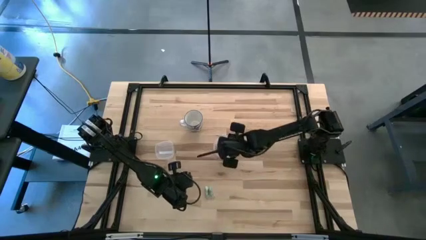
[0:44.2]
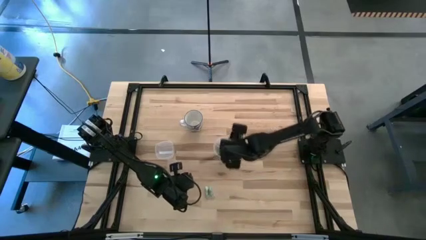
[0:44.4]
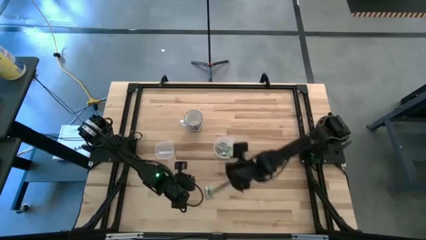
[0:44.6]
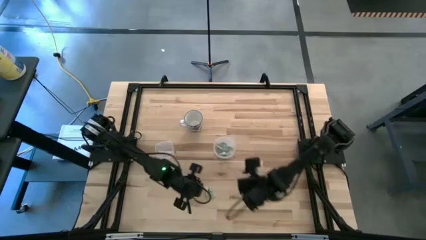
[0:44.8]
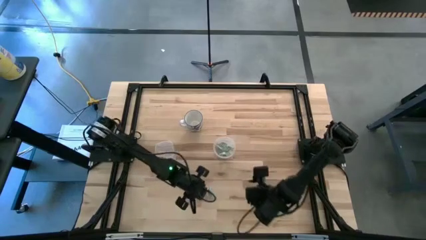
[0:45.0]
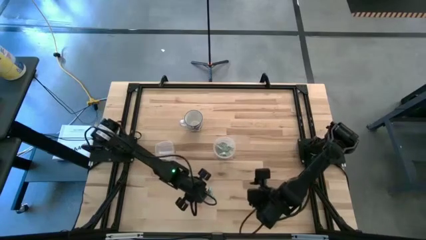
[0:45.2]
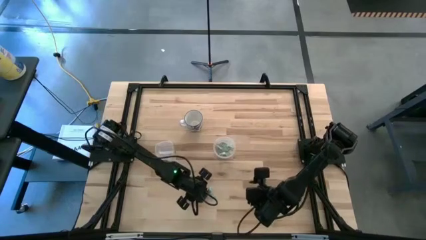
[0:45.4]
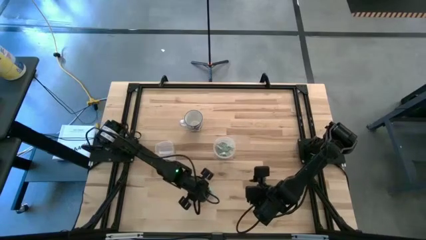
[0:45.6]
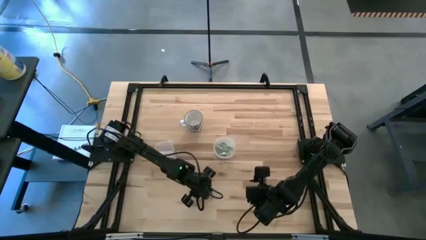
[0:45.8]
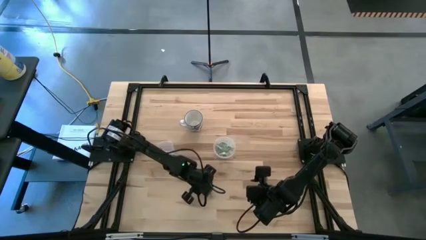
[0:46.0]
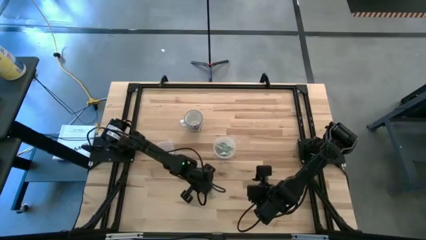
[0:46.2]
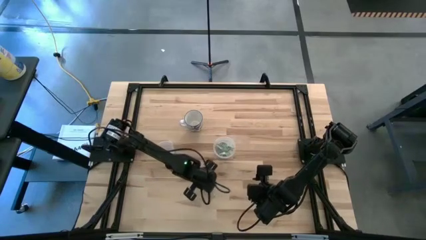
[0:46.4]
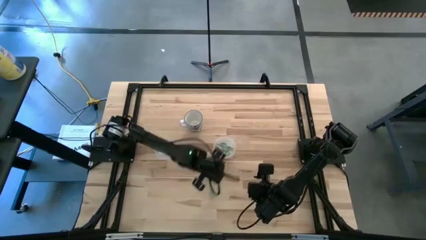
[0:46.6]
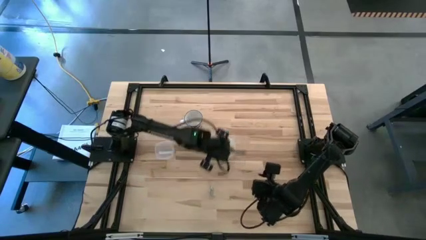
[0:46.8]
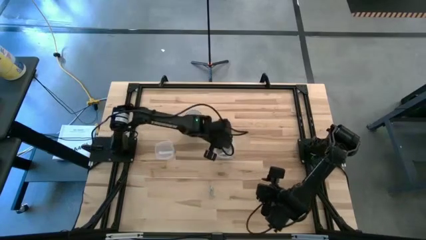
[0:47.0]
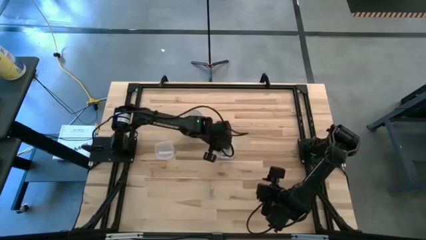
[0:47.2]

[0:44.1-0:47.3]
Task: Pick and place Stevia / Truvia into bins
Put the white stevia packet into the right transparent container

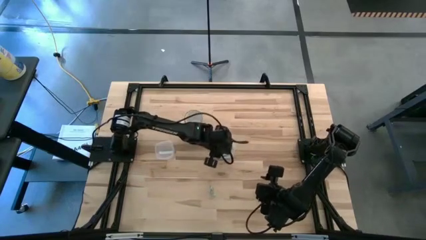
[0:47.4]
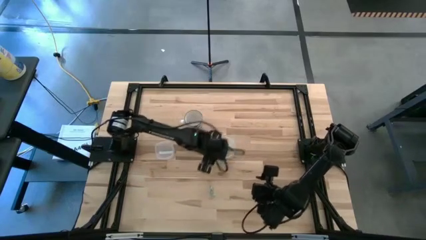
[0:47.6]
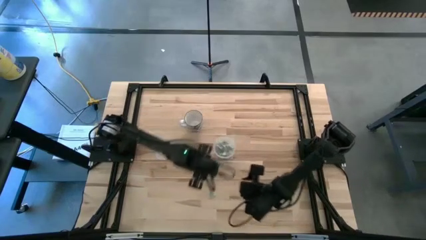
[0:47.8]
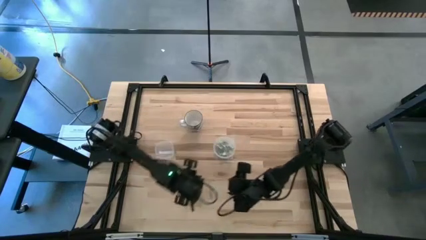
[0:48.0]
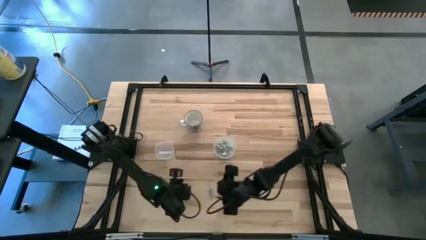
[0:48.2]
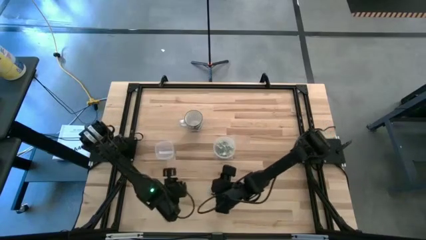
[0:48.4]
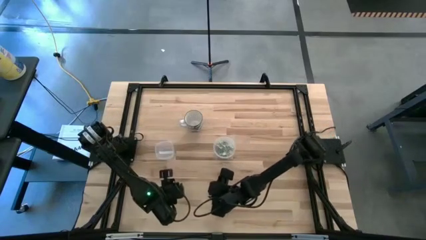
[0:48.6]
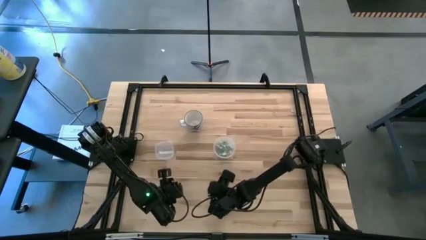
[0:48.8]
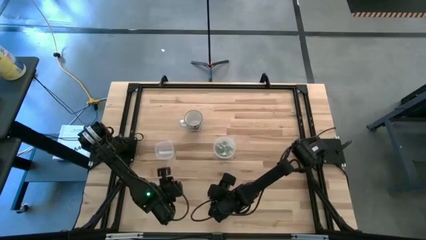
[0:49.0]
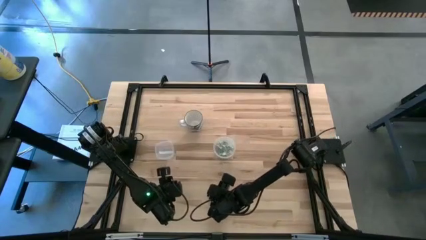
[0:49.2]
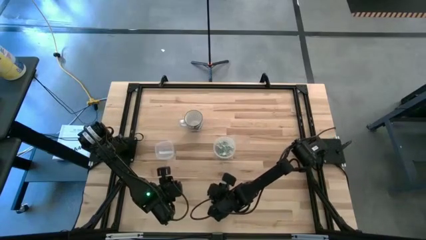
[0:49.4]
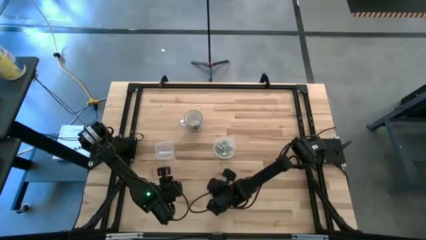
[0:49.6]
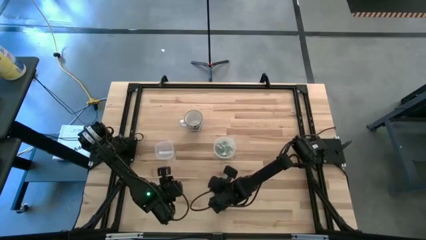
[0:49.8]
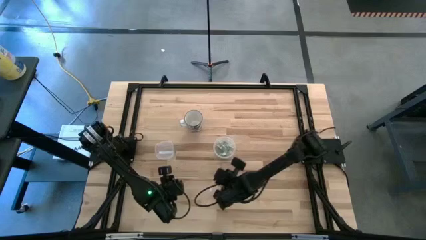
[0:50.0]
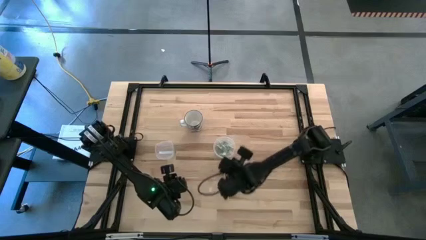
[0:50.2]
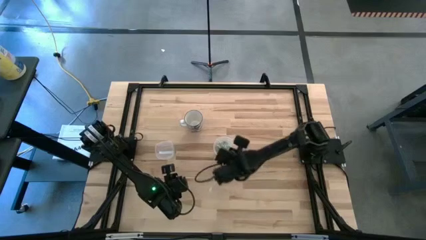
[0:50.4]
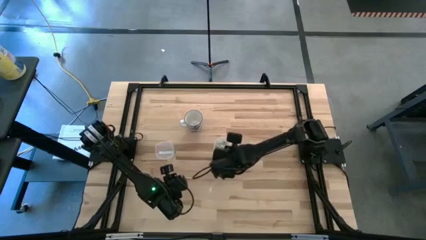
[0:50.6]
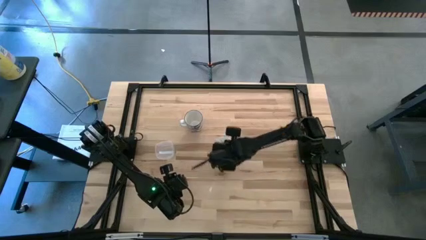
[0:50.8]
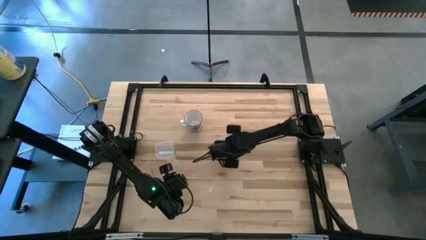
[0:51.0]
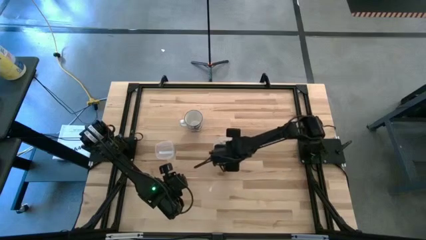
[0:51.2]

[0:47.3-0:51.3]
Put the white stevia packet into the right transparent container

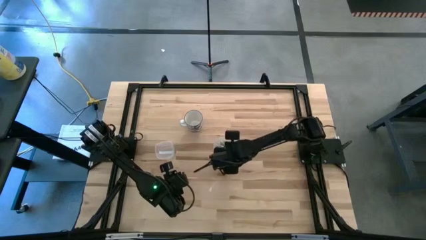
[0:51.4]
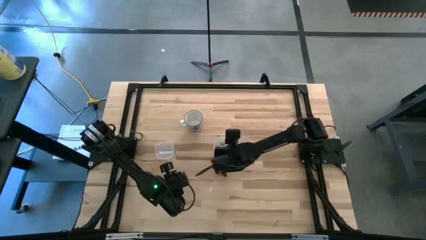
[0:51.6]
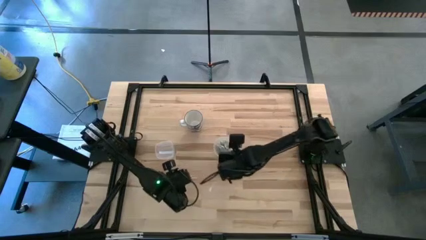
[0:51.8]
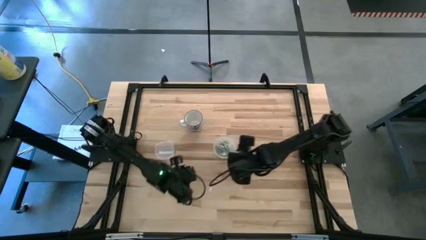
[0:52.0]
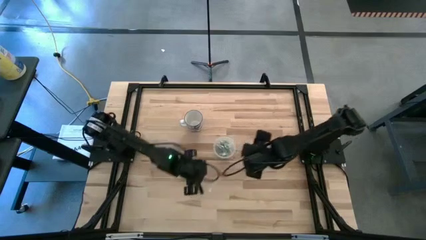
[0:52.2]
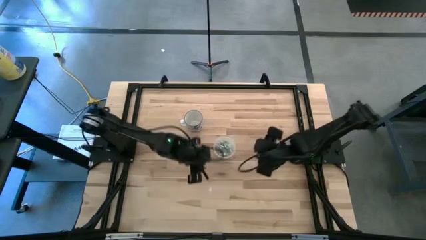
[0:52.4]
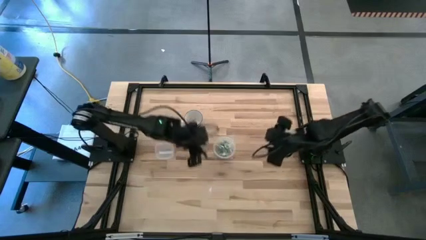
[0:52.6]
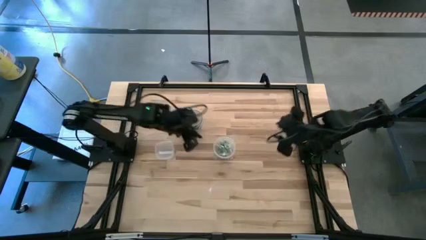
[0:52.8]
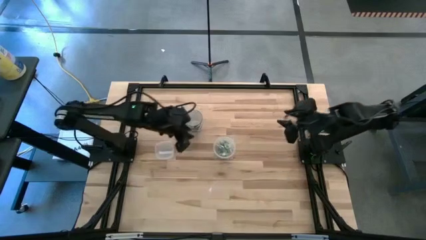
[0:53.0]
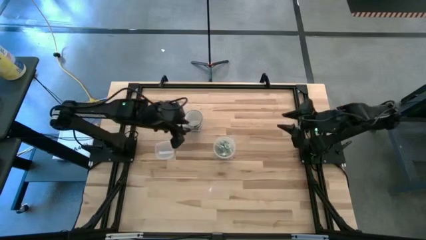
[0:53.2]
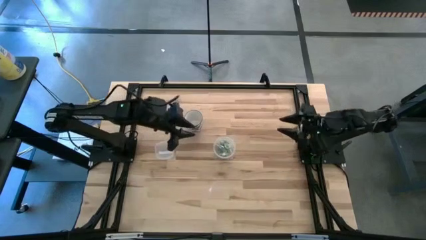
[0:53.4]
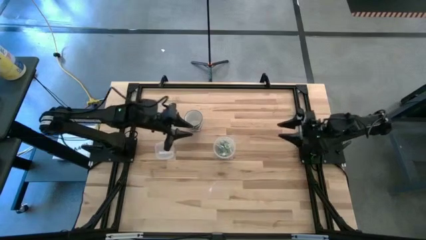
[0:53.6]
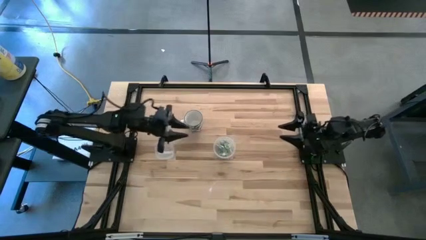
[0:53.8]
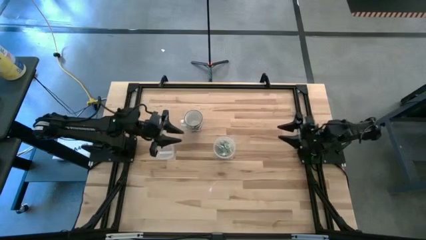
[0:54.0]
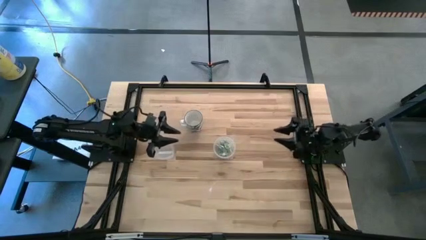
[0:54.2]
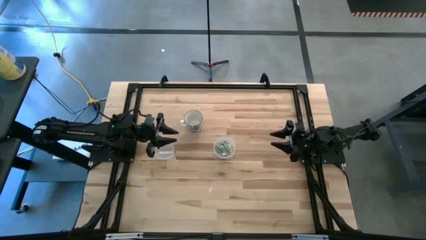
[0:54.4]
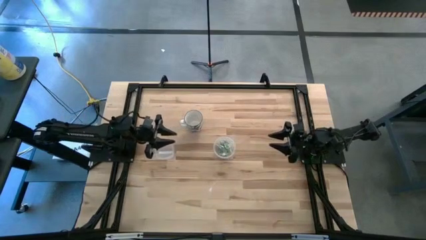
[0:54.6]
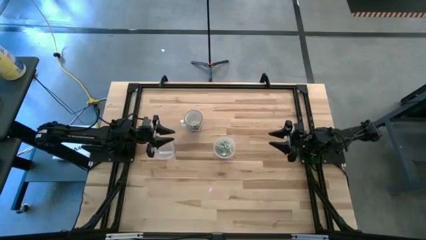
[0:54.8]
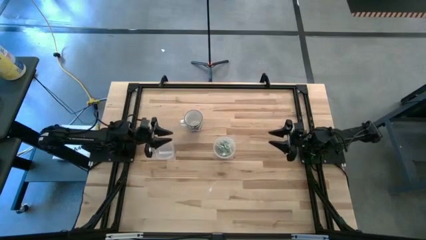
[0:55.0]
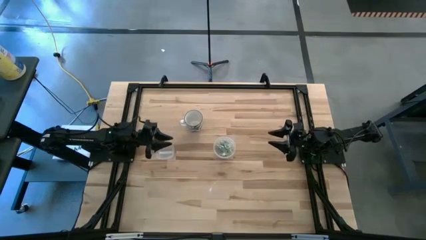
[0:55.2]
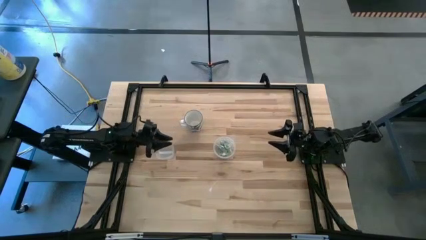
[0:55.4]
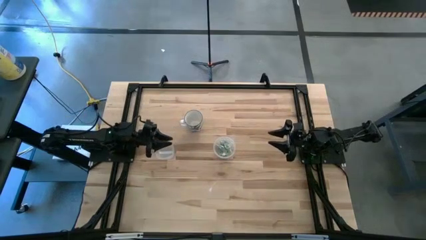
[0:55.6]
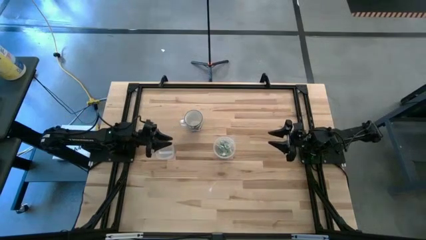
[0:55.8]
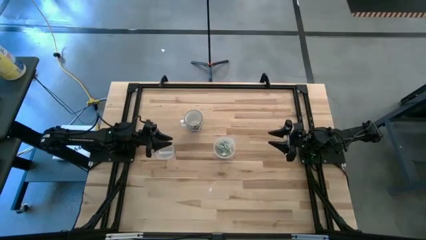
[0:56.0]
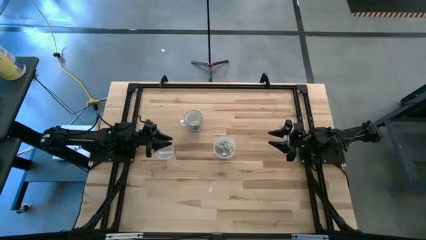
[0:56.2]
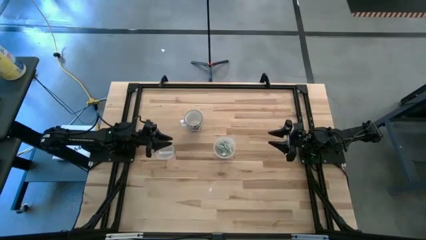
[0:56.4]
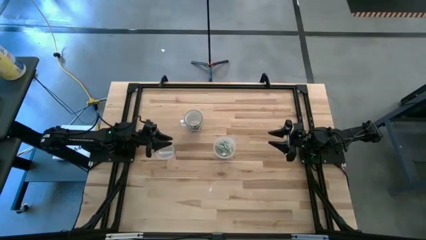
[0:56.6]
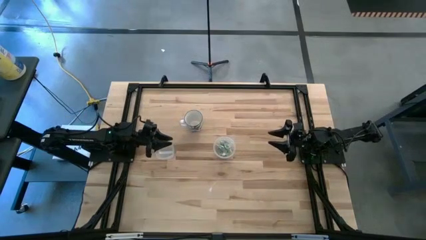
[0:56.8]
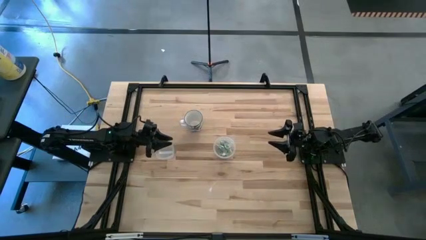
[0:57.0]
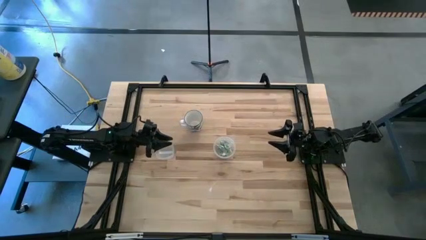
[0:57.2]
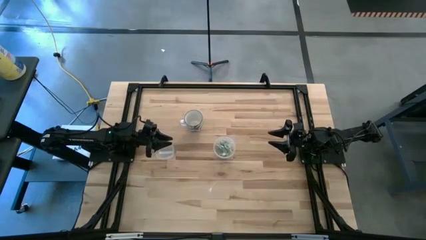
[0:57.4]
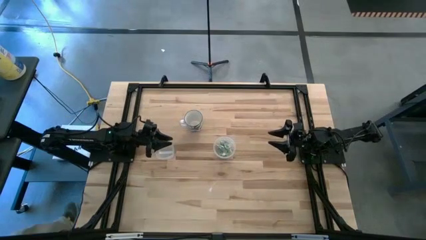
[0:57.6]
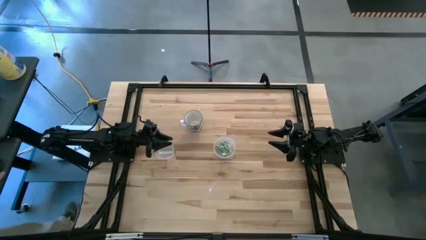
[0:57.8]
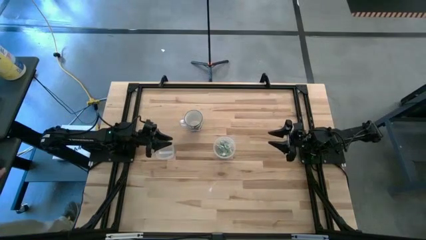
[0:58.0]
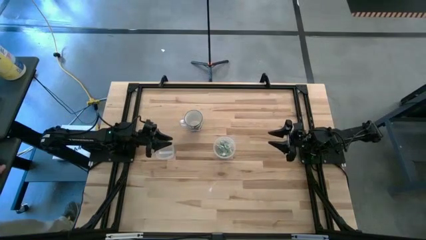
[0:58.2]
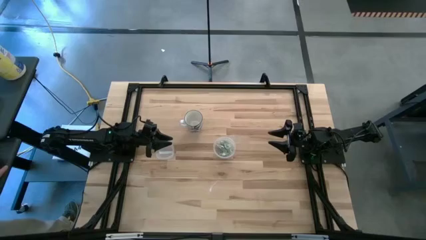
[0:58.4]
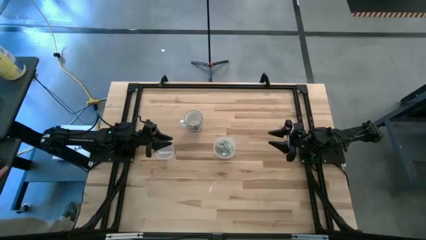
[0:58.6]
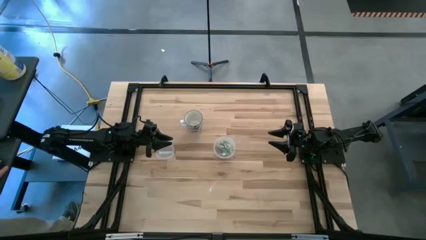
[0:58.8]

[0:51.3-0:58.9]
Return to Home Position

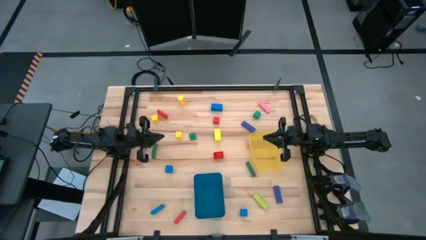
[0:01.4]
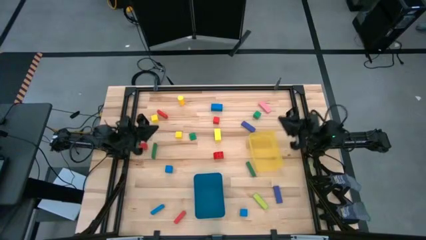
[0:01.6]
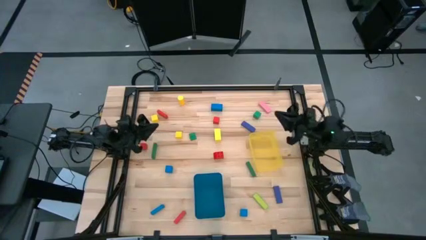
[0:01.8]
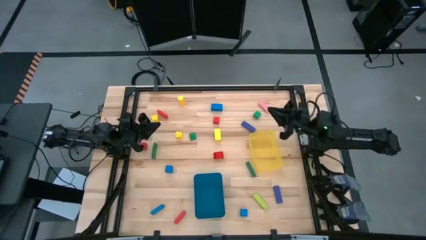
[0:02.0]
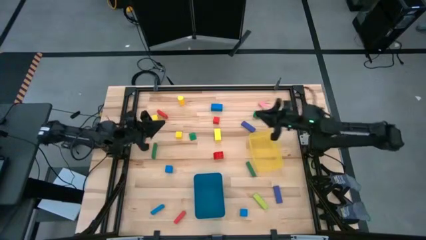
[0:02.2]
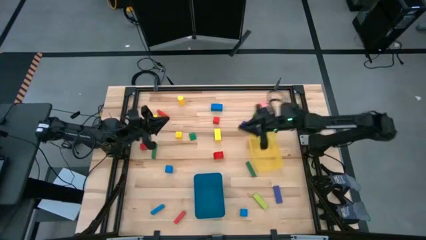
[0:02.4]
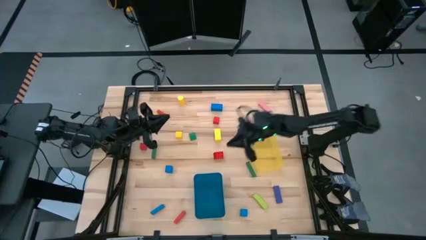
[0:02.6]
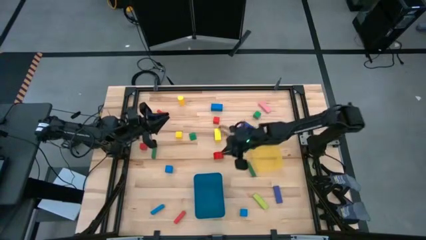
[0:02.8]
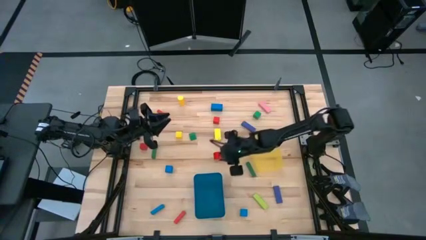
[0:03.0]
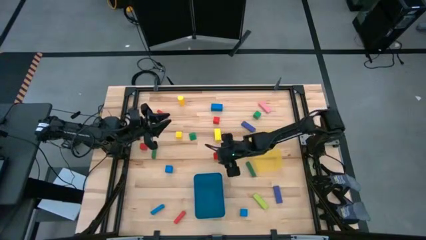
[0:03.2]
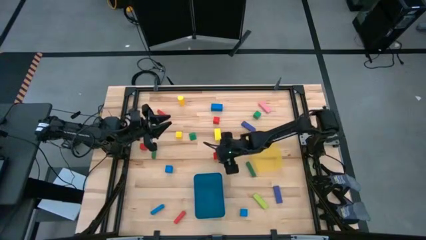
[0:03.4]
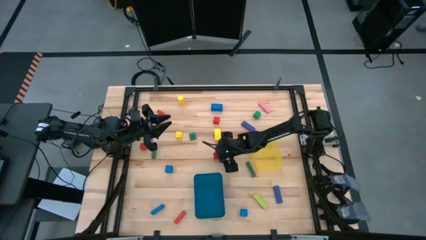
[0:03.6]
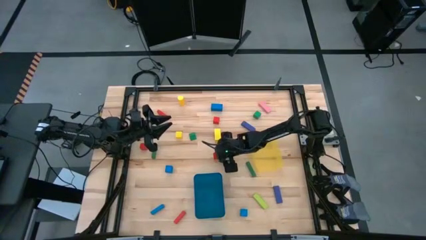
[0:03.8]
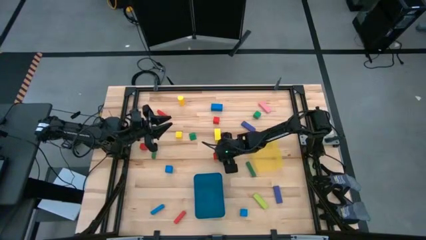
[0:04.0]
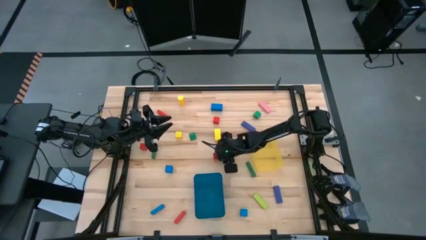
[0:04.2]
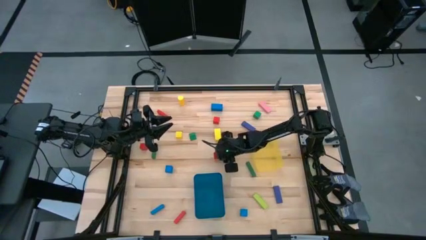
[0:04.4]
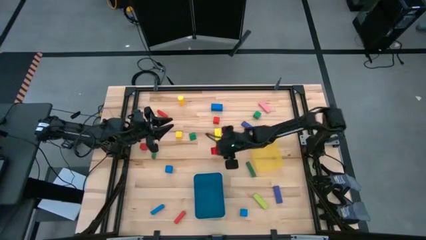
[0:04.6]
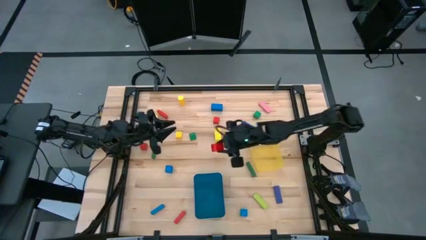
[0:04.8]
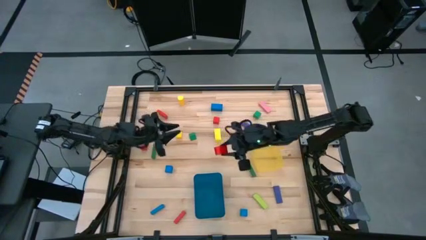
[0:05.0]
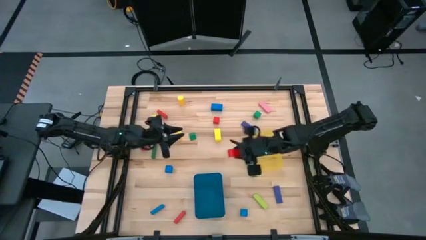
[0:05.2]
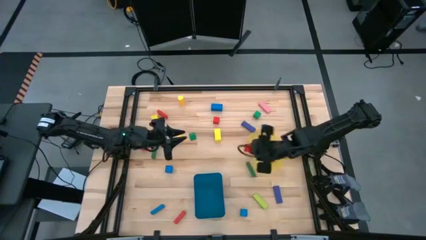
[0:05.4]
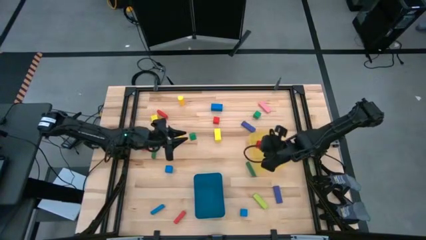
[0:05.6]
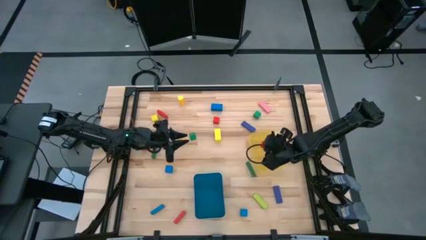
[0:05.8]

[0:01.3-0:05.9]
Task: Sort blocks by size
Put the small red game piece into the yellow bin
